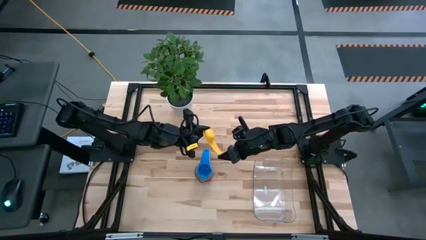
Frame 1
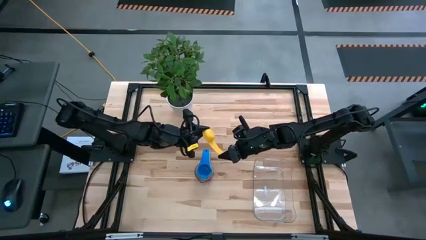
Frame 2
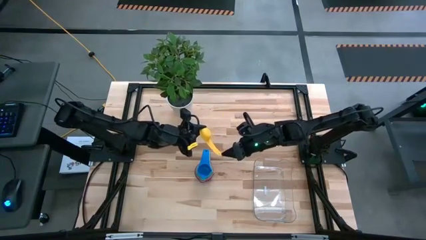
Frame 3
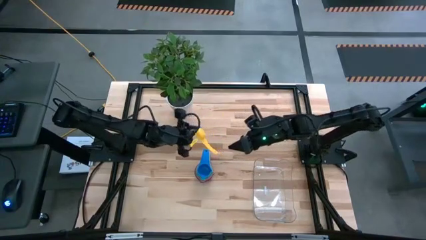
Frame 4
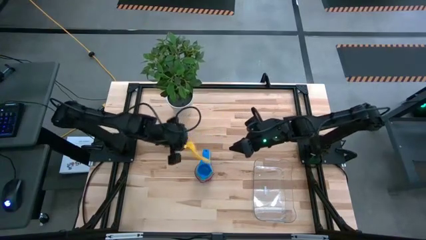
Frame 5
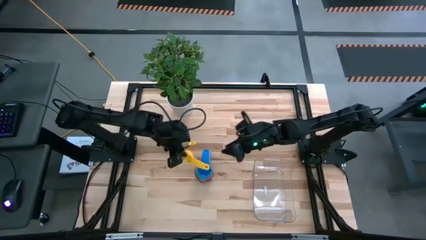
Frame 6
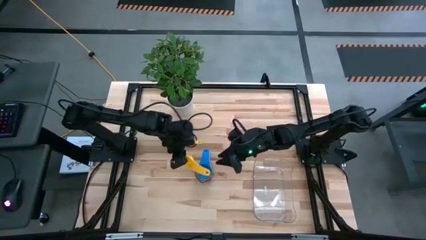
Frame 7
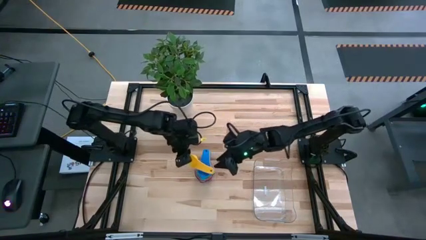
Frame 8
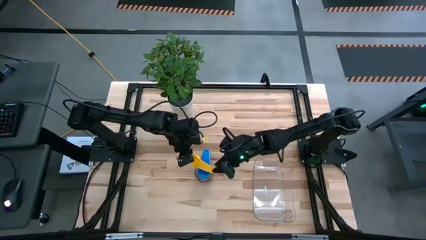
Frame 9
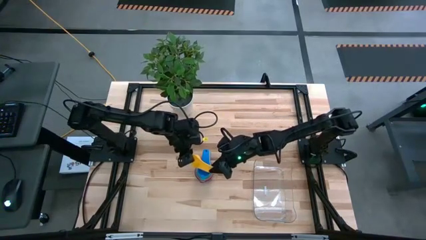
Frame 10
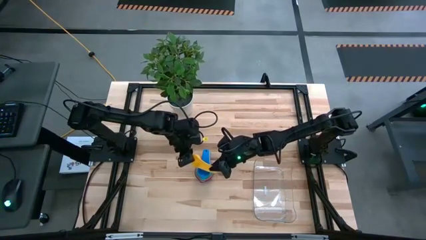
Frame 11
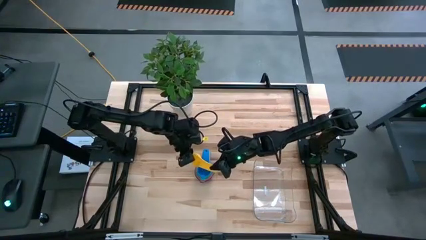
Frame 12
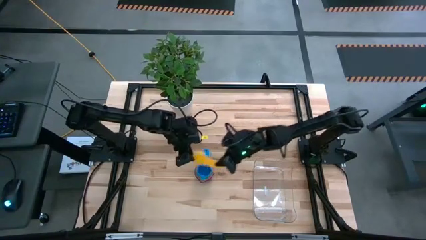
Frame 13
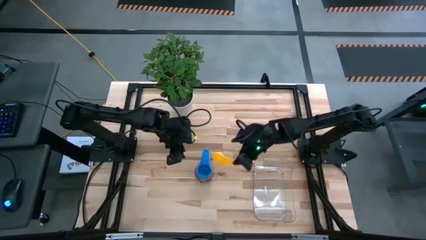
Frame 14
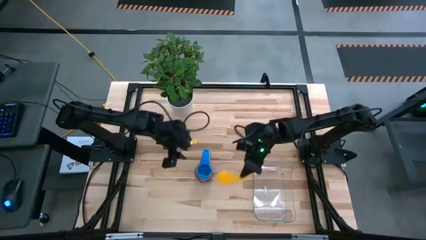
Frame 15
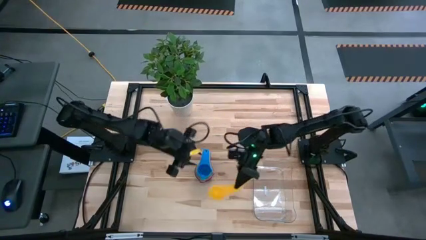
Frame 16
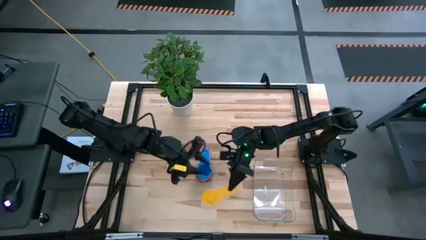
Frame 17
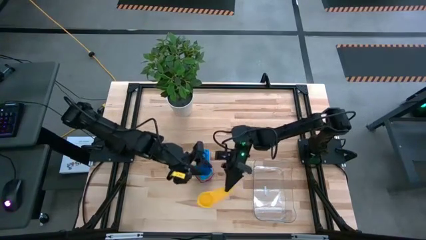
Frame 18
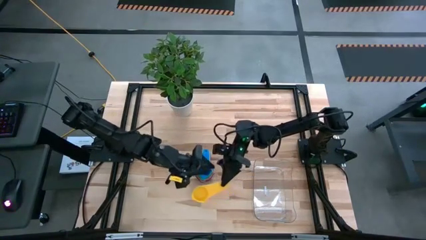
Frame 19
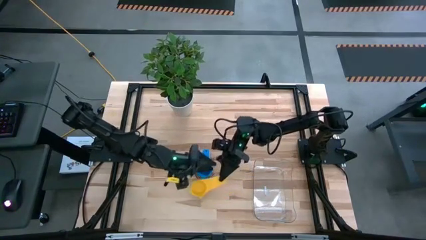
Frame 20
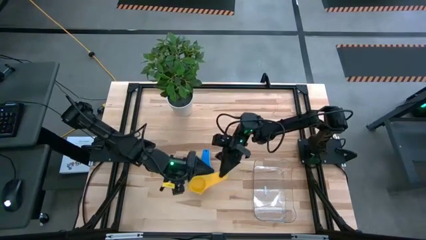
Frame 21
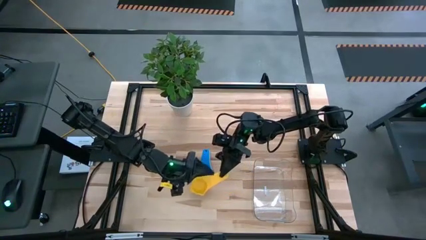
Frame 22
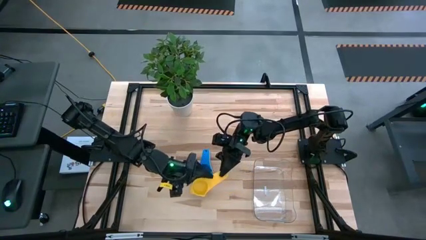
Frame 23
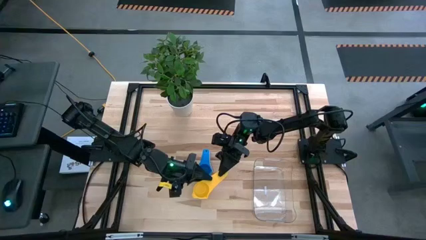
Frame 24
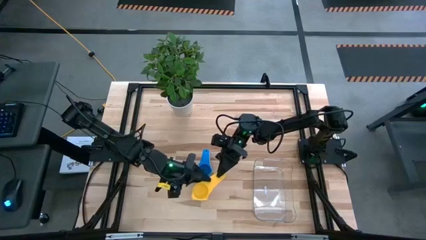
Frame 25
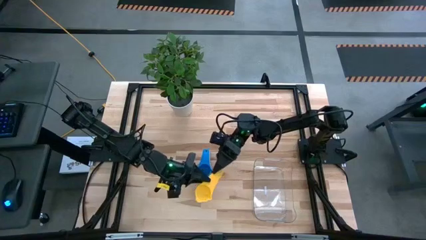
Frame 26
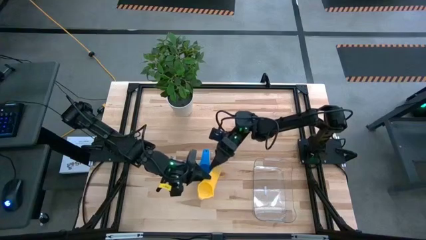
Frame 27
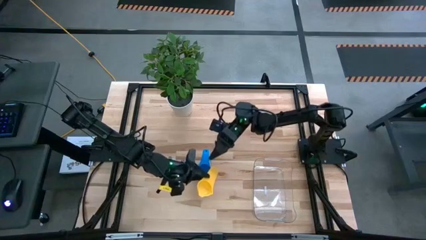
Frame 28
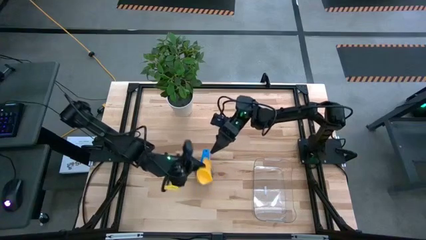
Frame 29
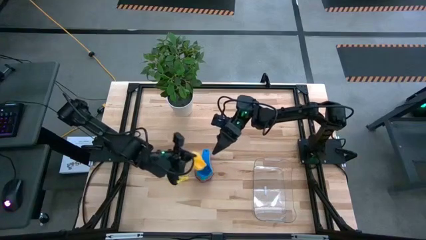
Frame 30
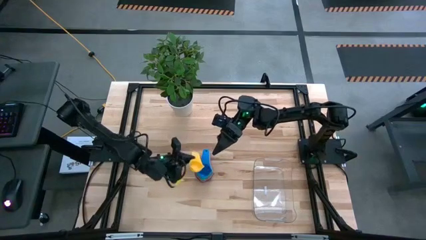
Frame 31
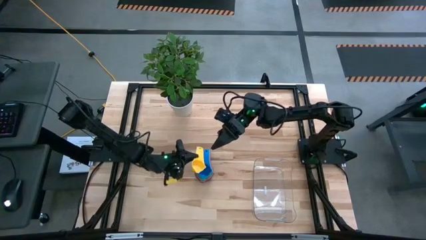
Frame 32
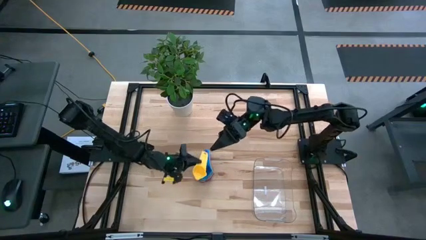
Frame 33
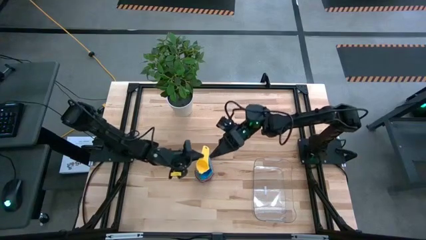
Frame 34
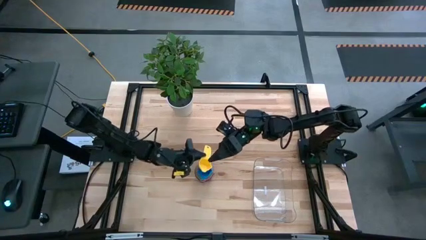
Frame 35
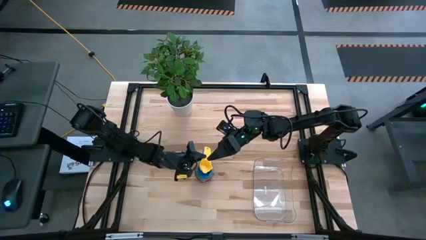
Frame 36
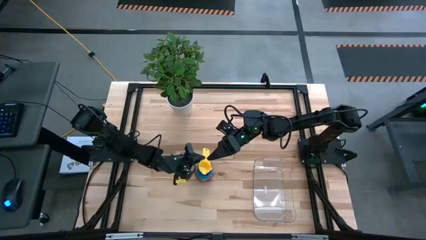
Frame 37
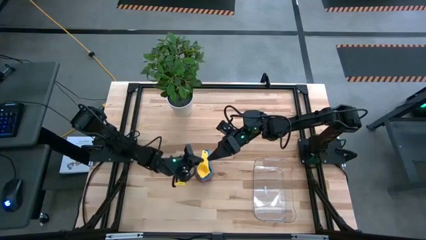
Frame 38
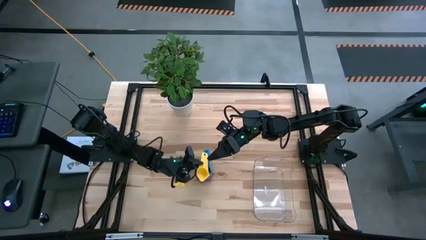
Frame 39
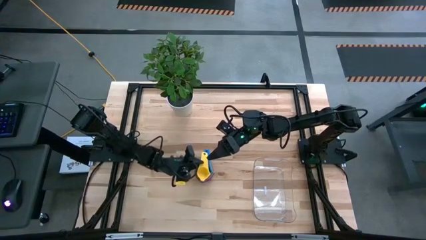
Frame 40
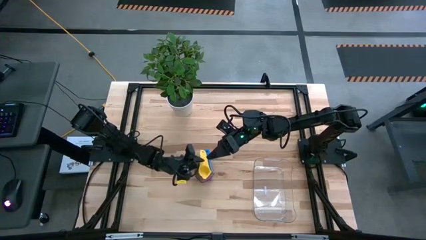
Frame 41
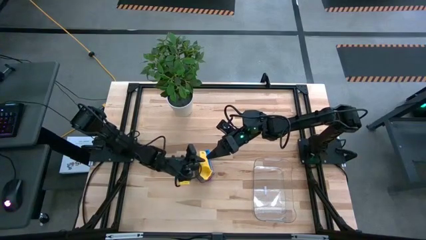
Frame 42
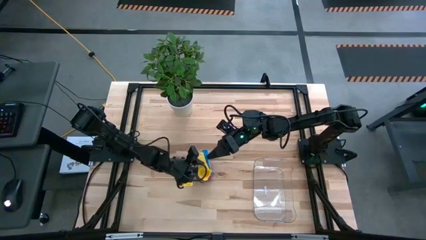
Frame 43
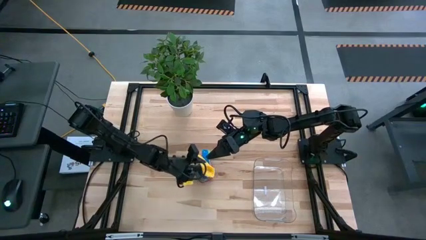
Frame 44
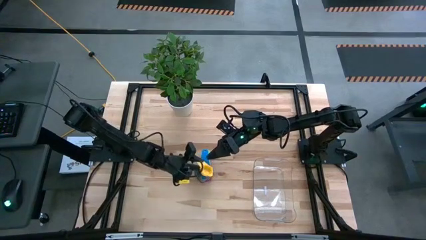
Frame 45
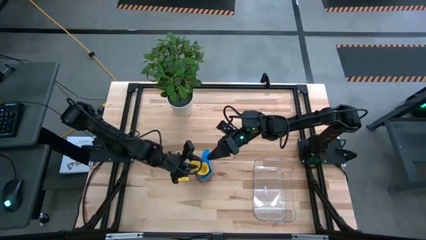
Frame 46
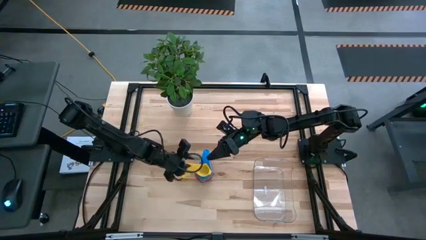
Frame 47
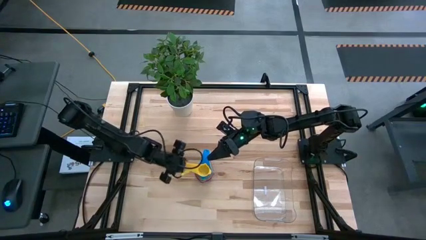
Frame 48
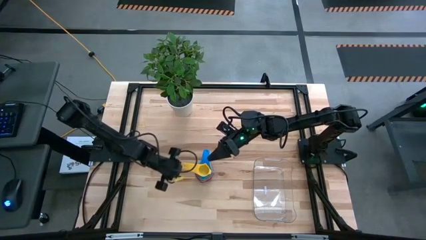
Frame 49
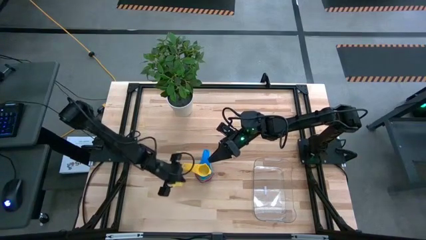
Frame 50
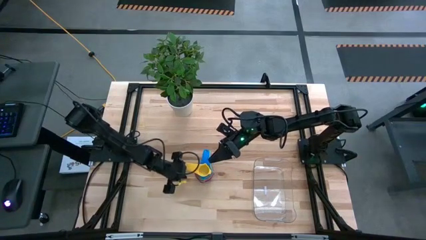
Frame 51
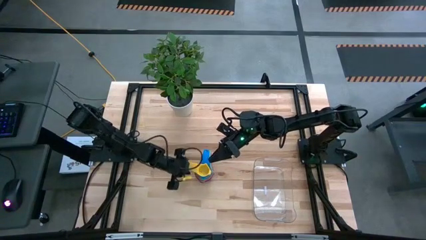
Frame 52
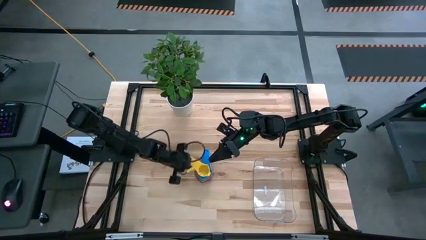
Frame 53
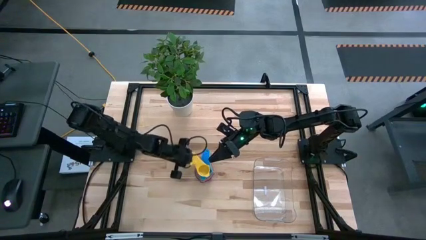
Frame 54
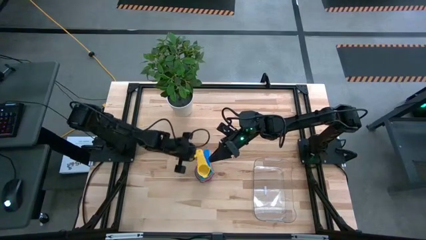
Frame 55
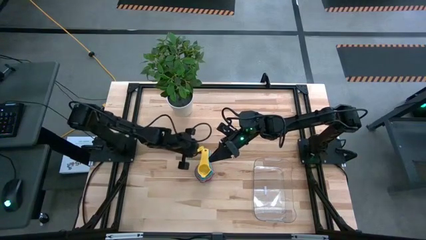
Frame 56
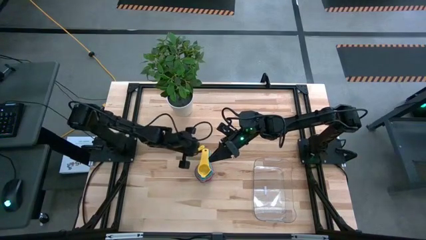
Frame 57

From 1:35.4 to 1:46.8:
Task: Nest measuring cups in basket
Stack the yellow measuring cup on top of the blue measuring cup
